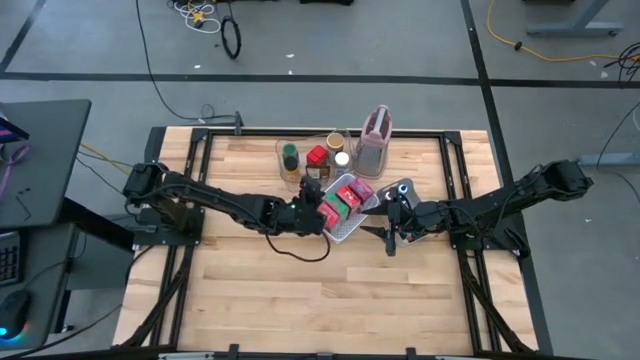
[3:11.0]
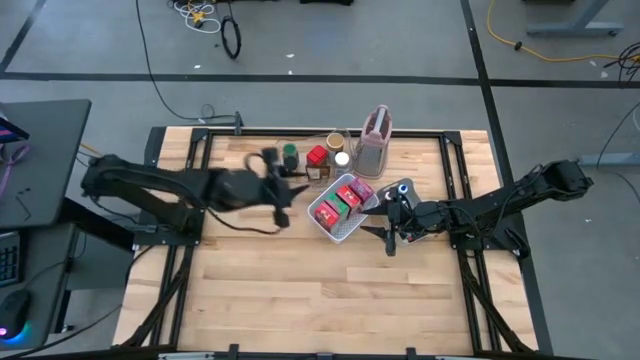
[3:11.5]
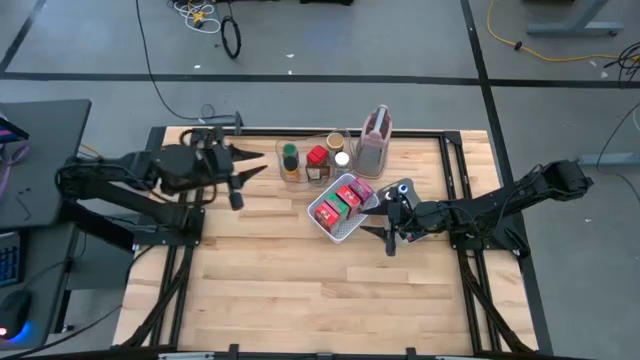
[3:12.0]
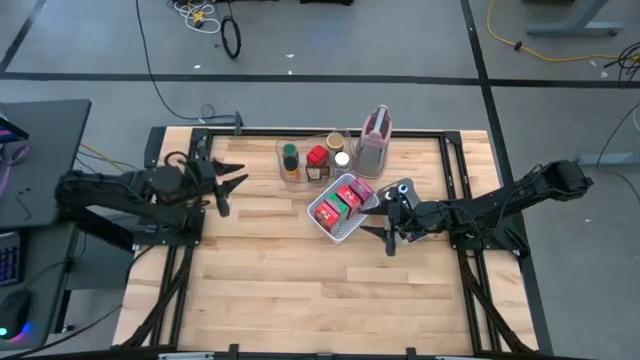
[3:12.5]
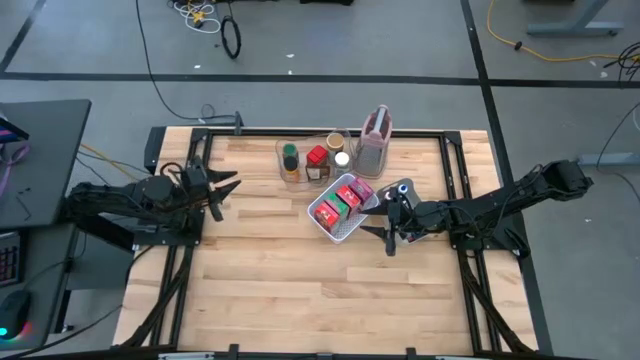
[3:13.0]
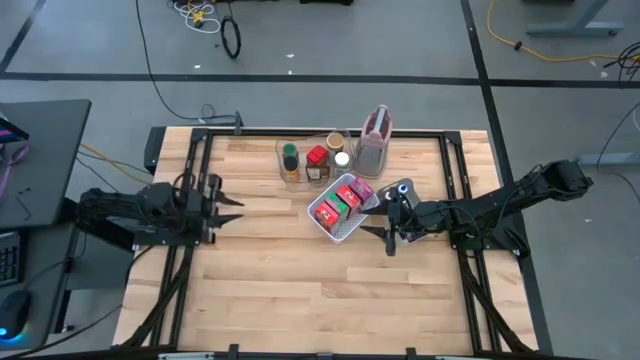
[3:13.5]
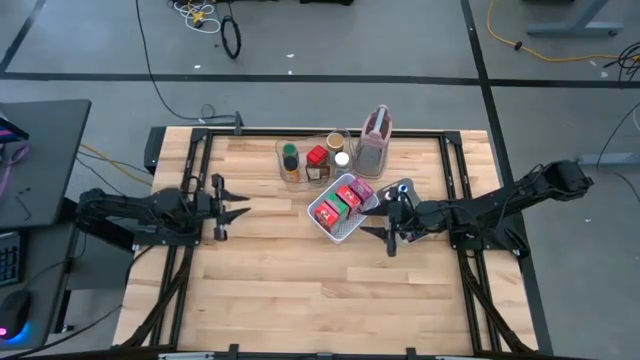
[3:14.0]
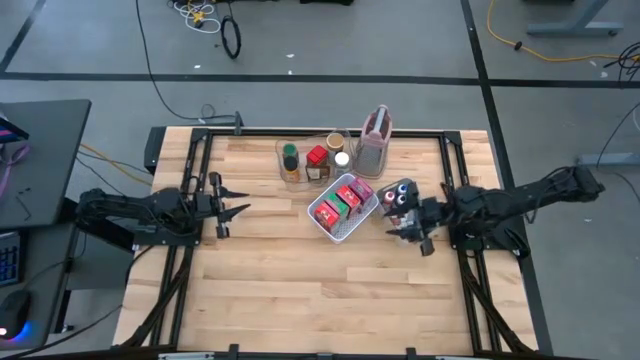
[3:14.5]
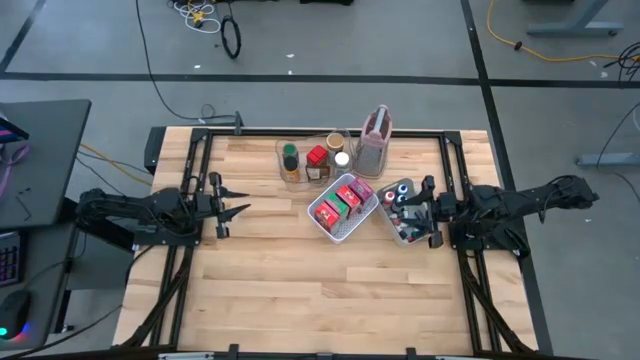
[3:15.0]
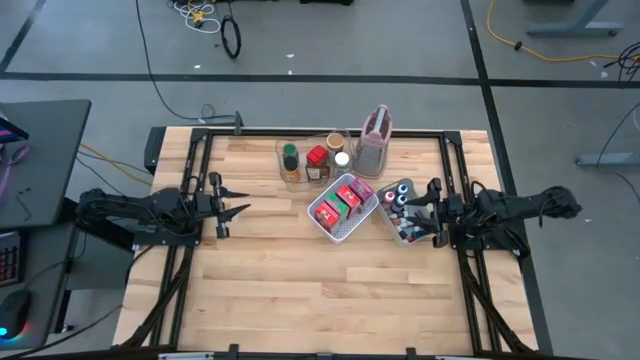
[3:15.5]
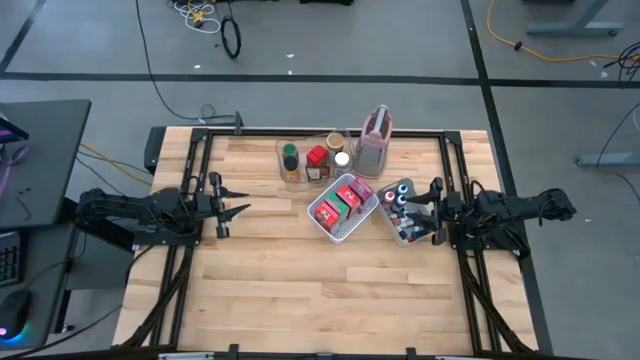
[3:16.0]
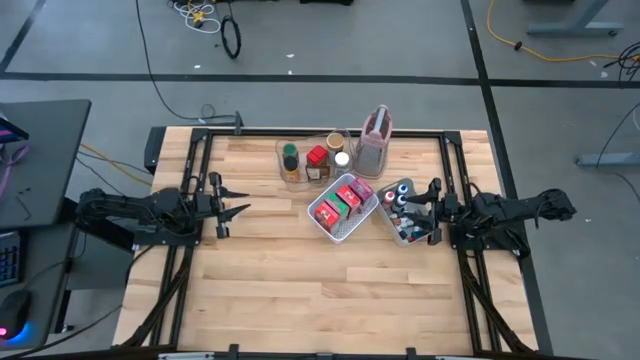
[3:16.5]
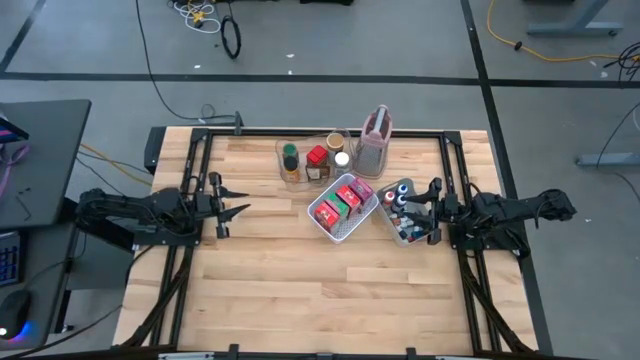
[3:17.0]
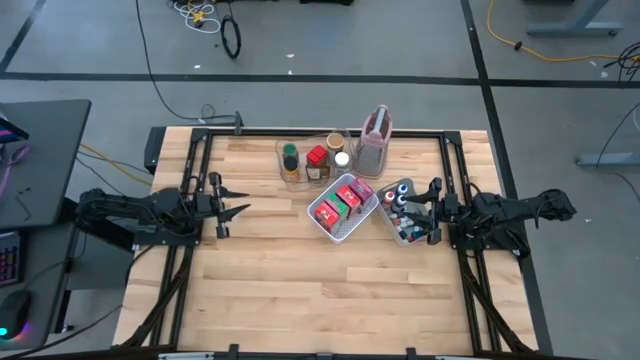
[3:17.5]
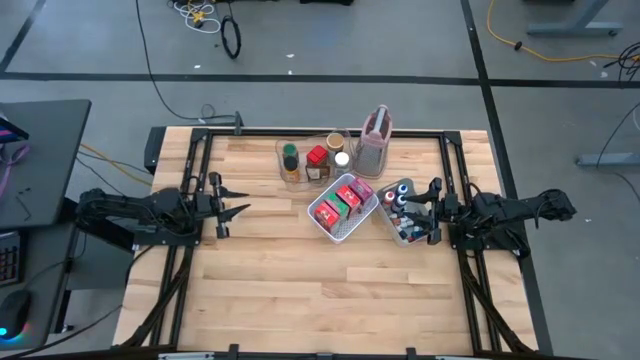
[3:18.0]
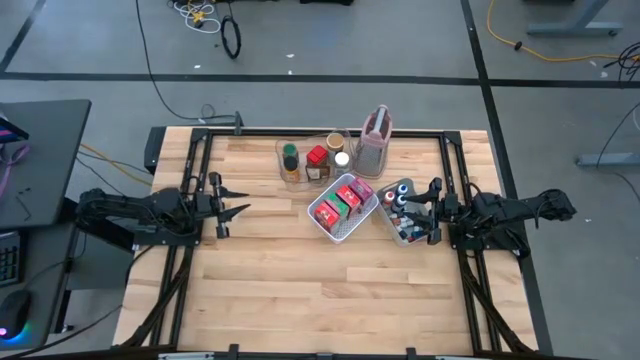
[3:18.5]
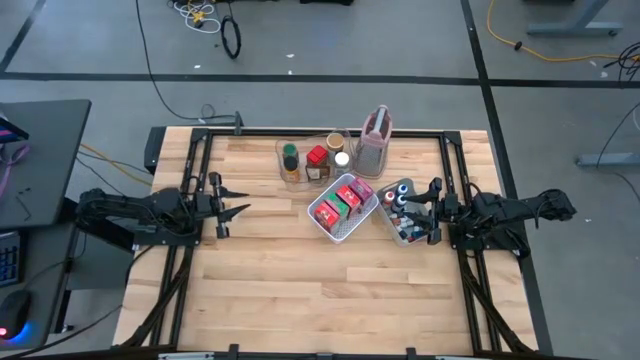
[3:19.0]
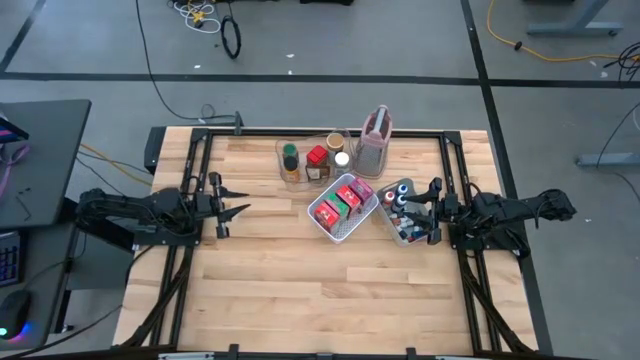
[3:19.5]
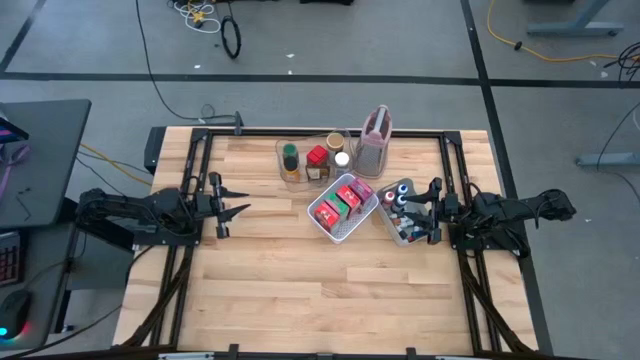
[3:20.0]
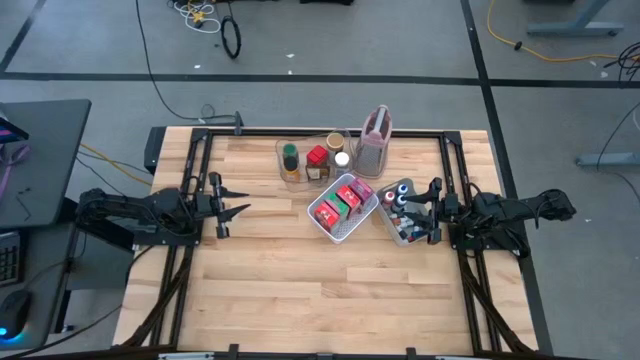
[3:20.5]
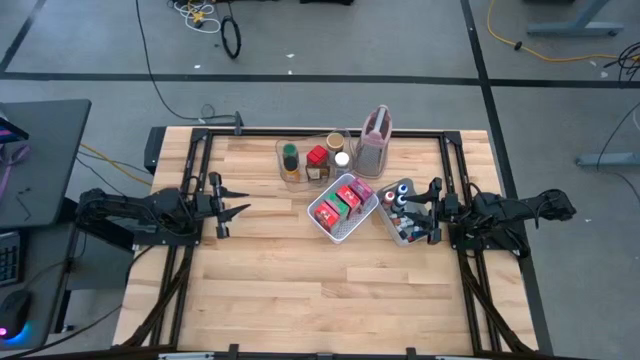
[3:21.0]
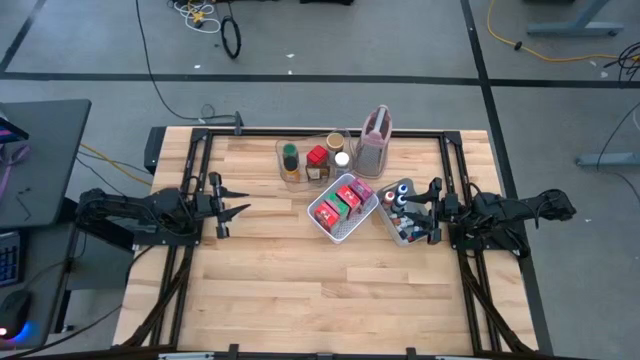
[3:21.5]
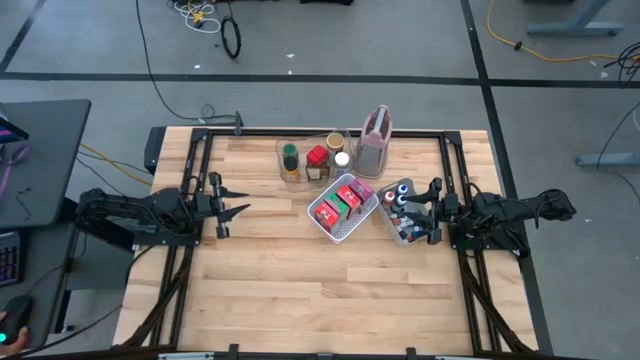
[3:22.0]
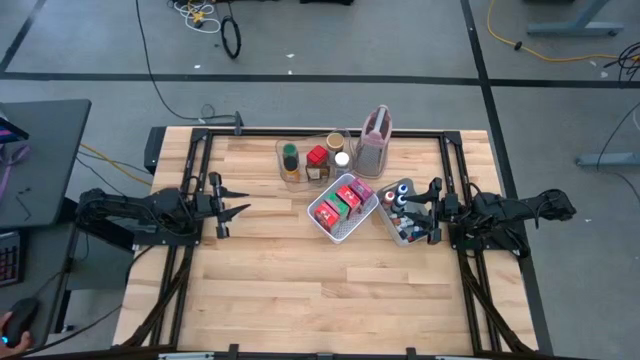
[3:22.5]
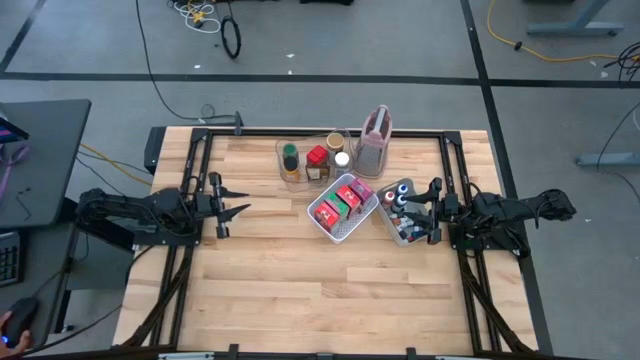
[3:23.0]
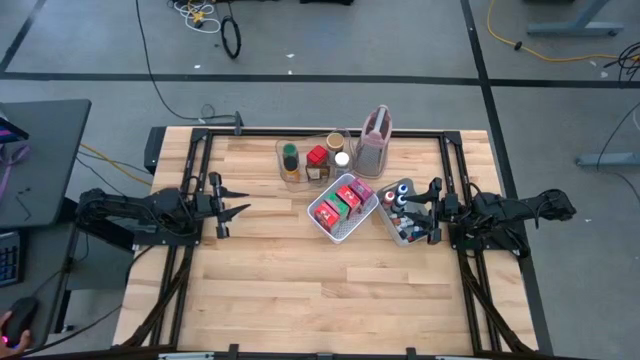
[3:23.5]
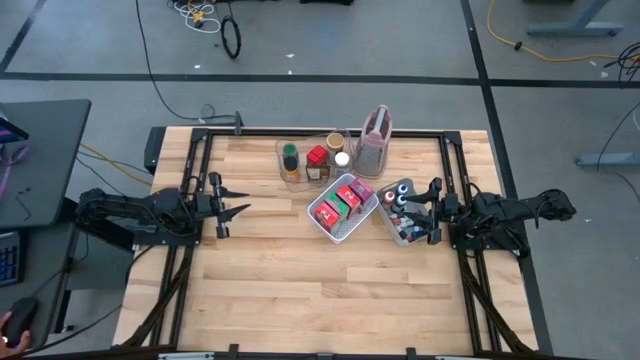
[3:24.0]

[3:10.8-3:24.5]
Task: Pick & Place Kitchen Items
Return to Home Position

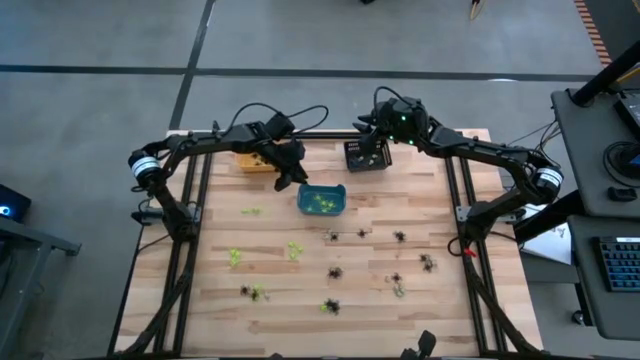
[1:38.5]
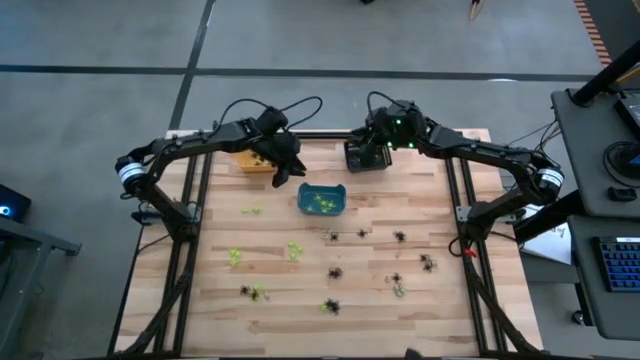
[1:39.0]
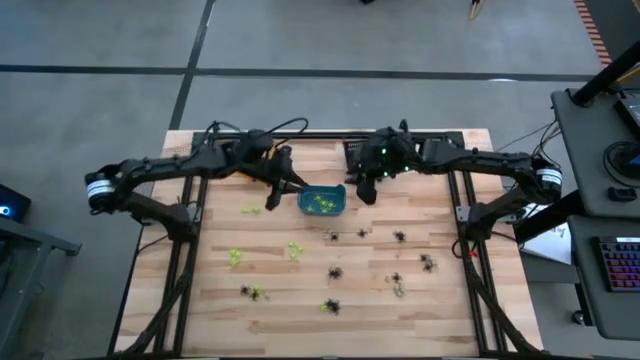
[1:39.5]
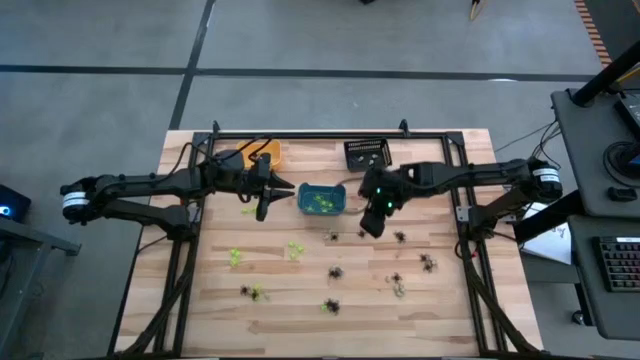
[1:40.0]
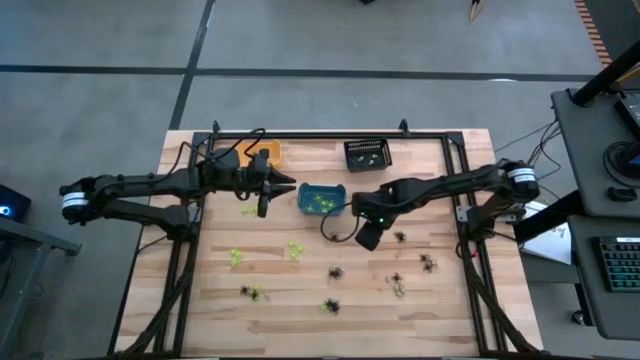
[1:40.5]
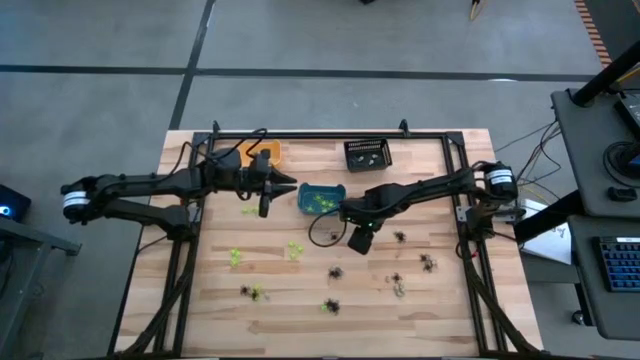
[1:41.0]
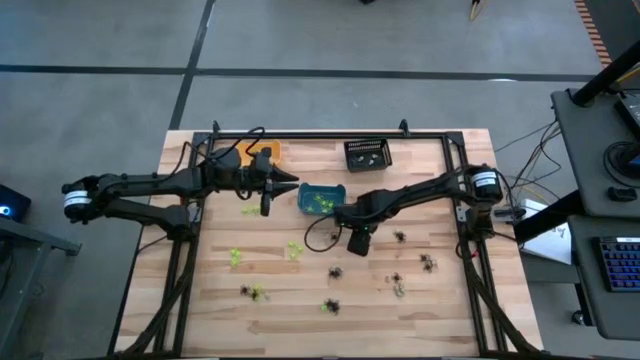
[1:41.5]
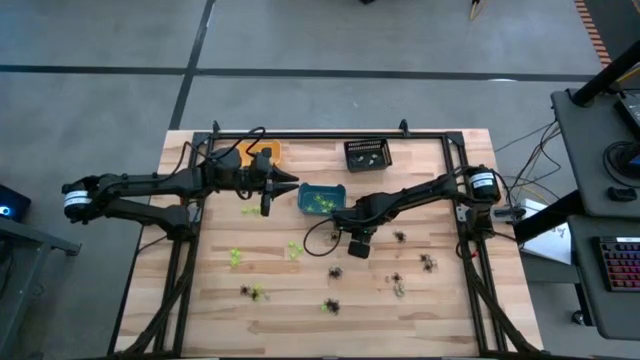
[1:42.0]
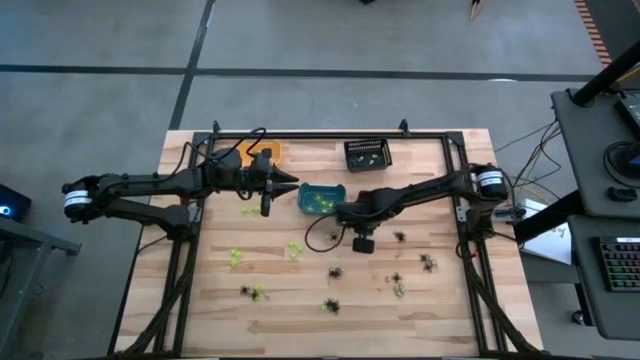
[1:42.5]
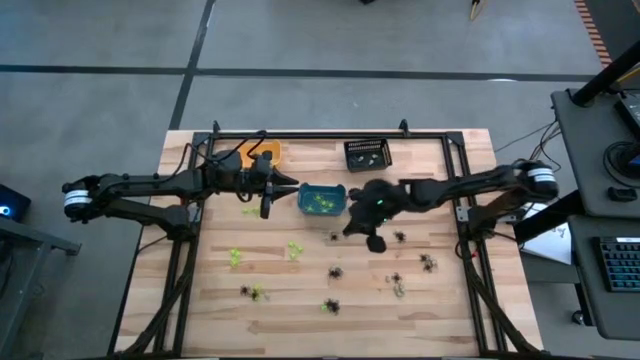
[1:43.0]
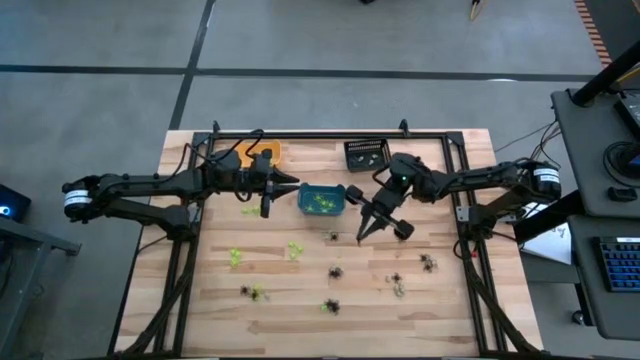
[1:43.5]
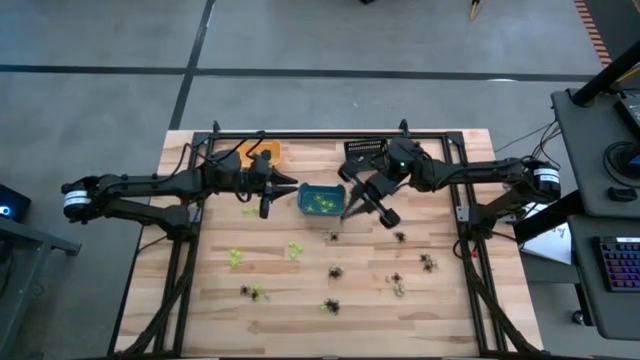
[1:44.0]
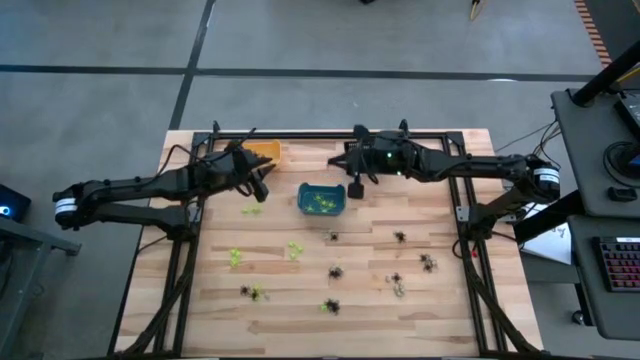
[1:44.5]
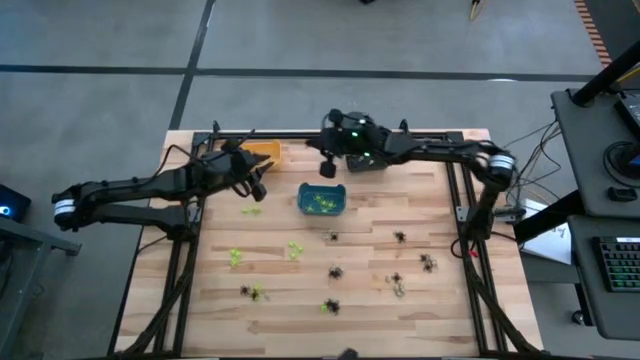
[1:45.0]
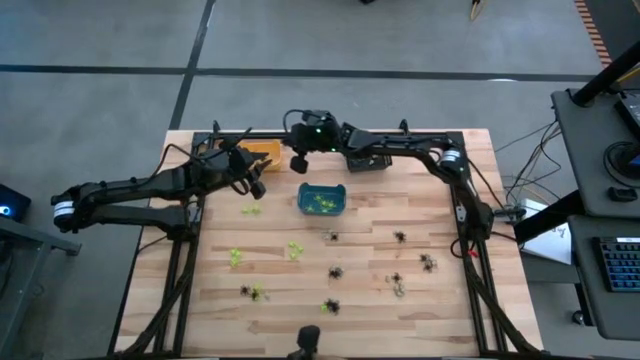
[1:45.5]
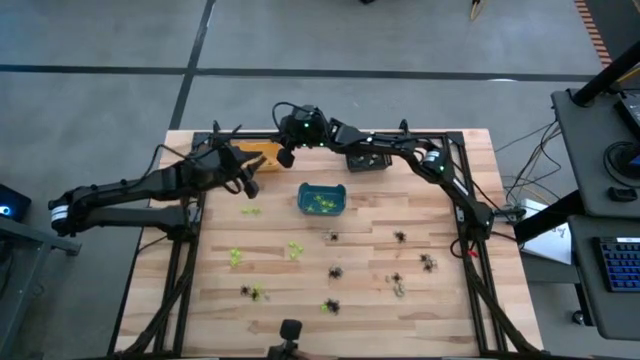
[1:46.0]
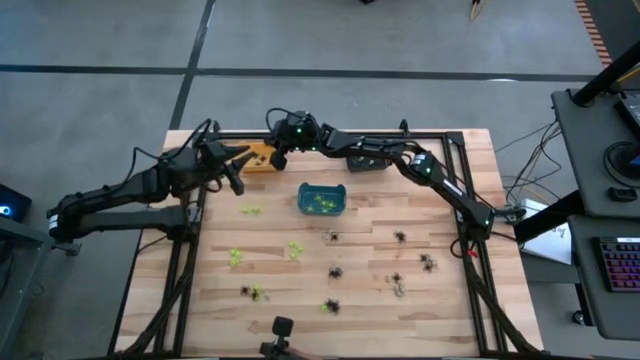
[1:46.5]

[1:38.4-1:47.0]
Task: Sort Halloween decoration
Put the black spider toy into the yellow bin
